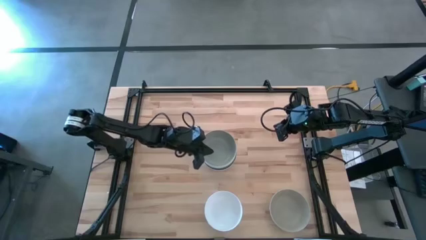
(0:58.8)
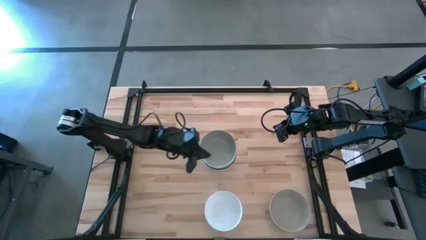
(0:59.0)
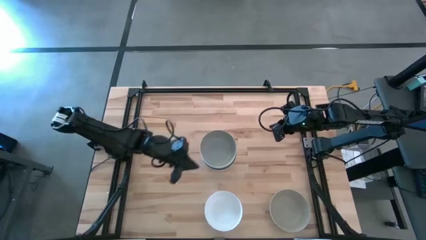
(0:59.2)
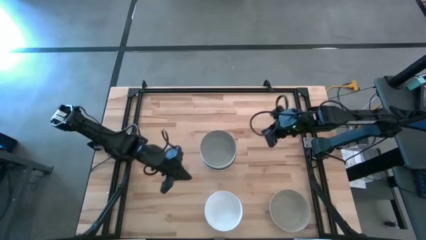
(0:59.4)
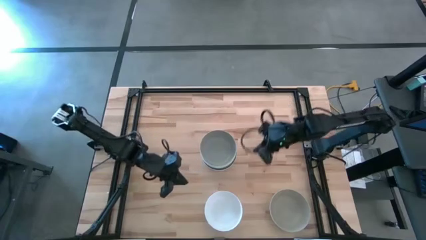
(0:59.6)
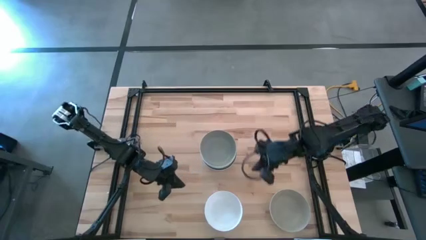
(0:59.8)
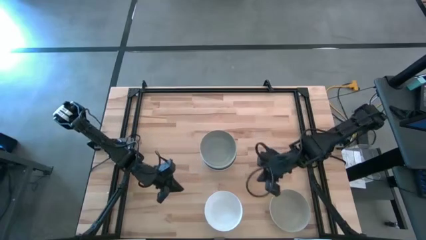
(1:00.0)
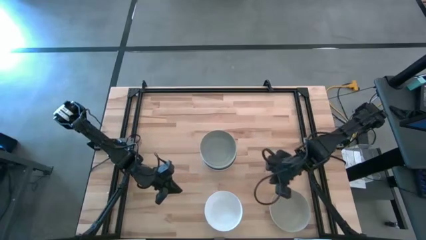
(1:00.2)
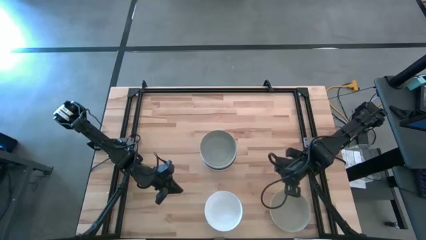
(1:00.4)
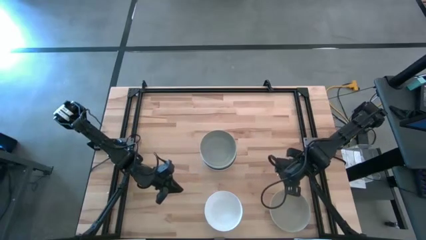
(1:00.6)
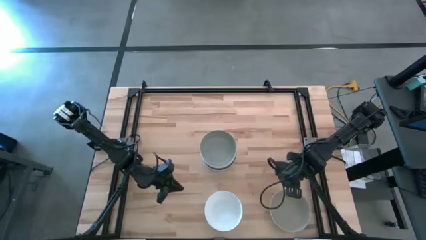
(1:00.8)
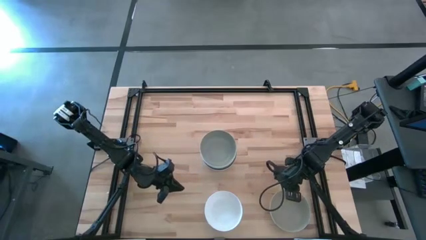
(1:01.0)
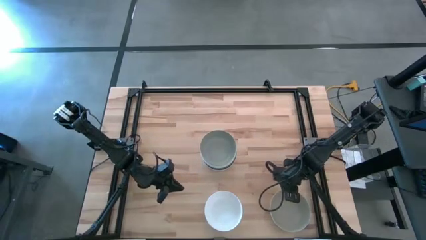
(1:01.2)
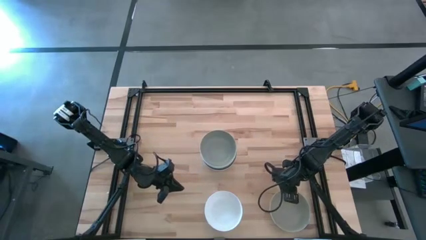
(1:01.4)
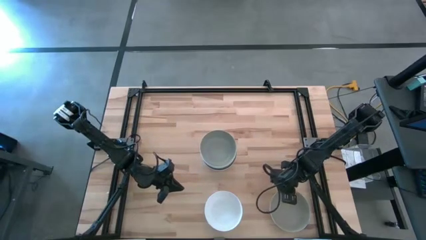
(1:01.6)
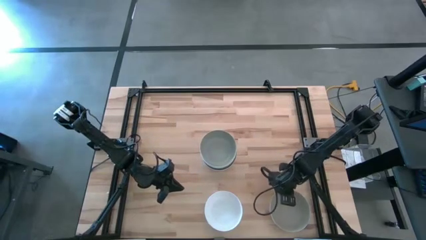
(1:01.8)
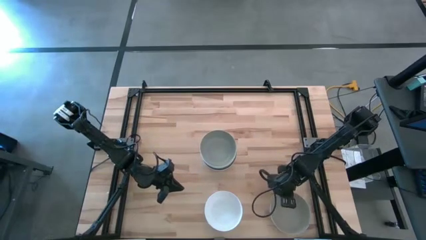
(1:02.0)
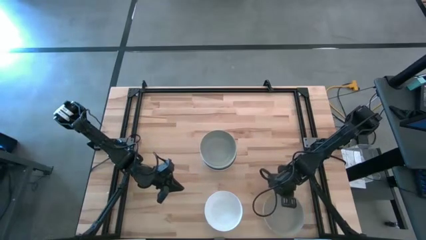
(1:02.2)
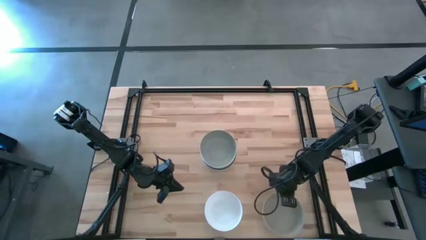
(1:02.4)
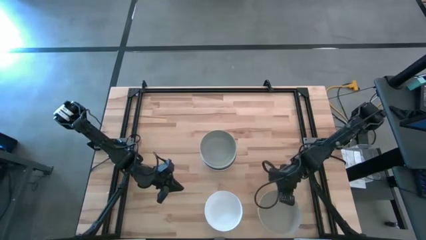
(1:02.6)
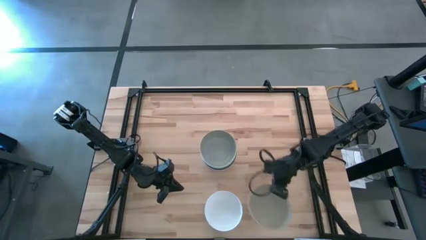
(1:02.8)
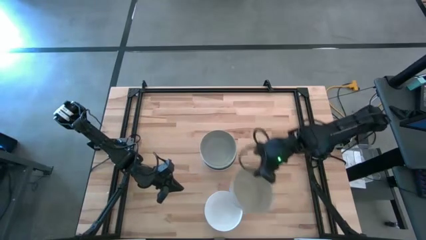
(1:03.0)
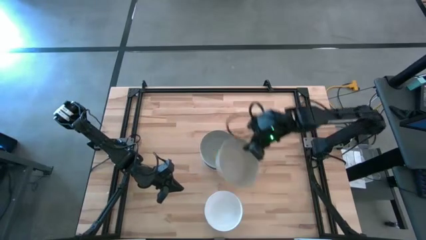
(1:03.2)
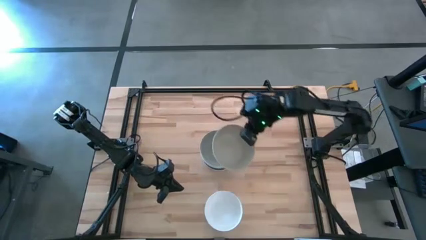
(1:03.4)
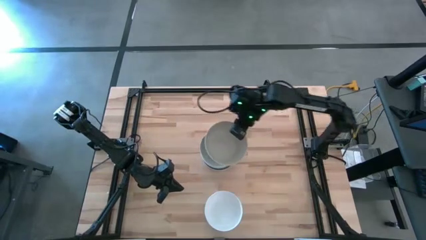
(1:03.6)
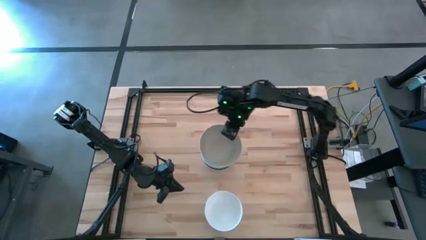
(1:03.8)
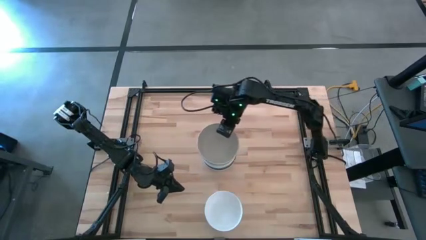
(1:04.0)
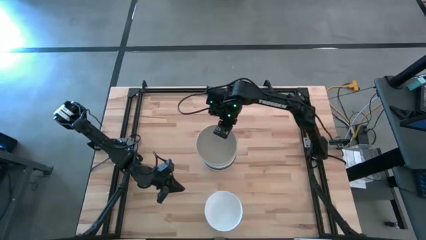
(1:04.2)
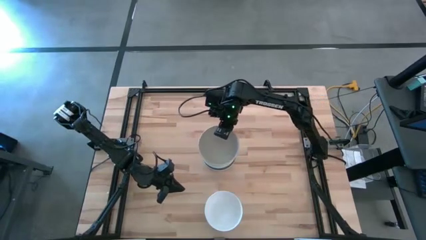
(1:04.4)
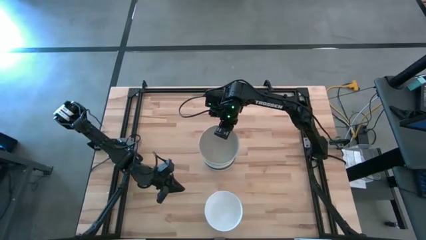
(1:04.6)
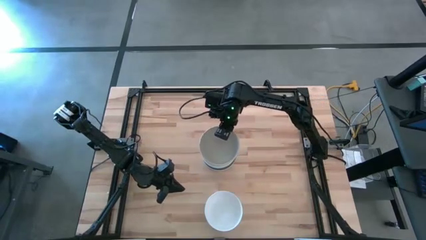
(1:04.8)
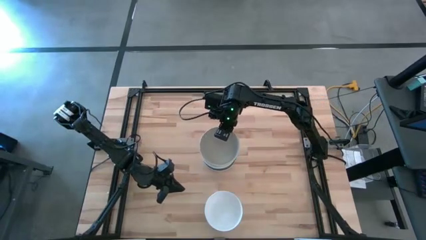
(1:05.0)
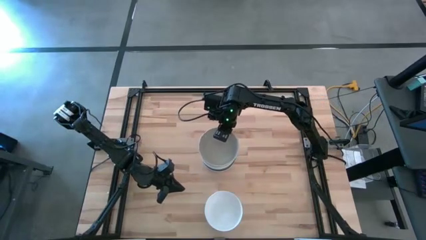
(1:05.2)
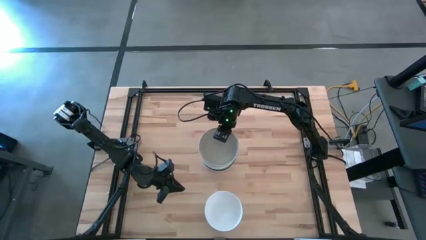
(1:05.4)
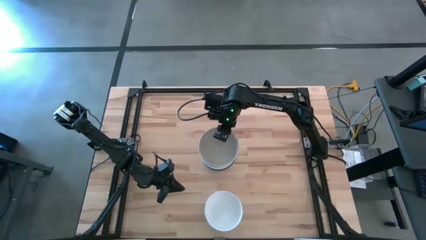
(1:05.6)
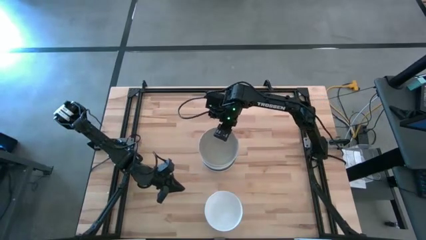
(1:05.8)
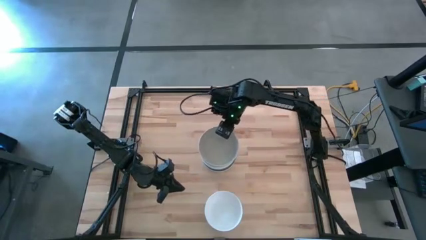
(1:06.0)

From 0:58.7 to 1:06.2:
Task: Nest bowls inside each other
Stack the brown bowl on the other brown bowl

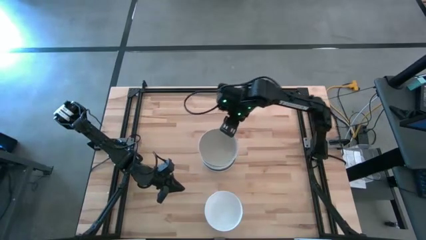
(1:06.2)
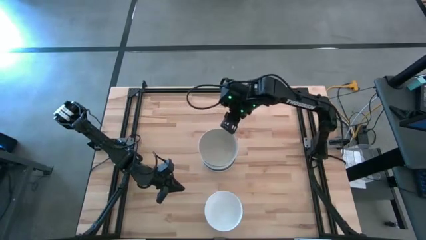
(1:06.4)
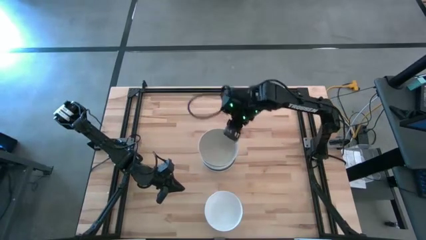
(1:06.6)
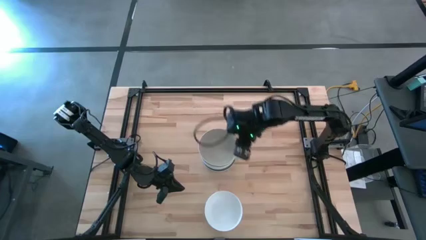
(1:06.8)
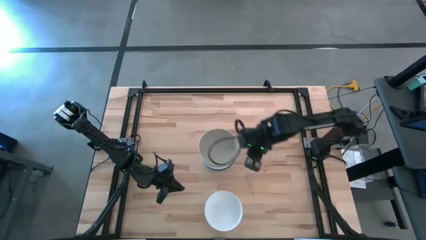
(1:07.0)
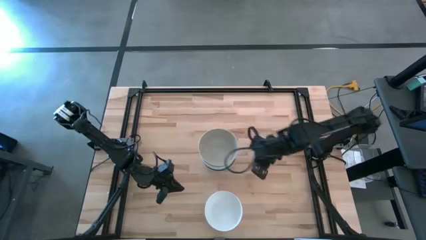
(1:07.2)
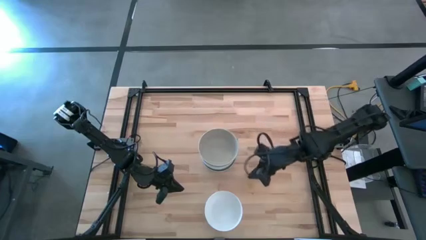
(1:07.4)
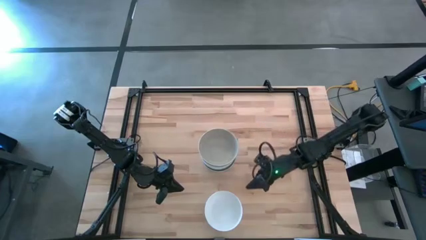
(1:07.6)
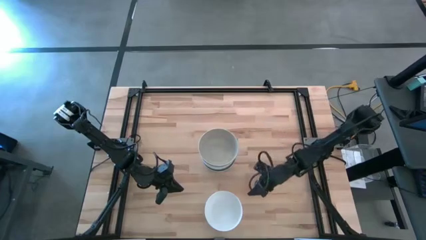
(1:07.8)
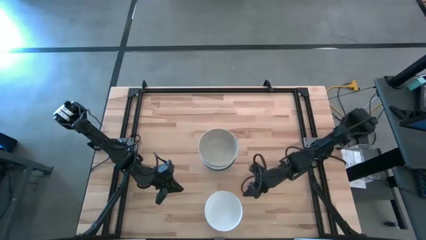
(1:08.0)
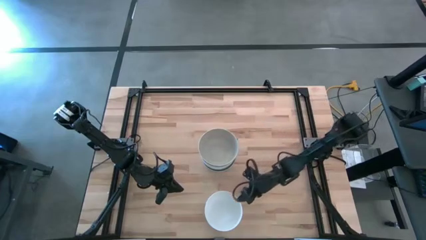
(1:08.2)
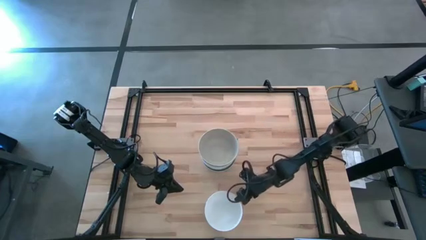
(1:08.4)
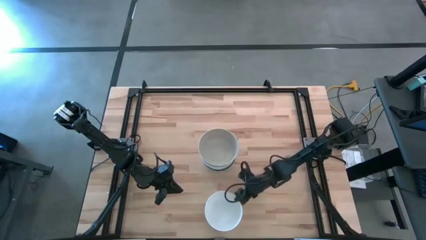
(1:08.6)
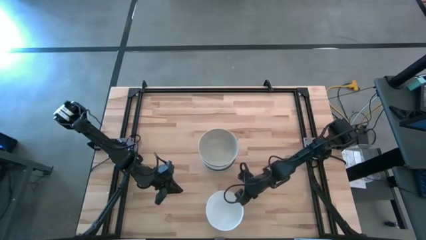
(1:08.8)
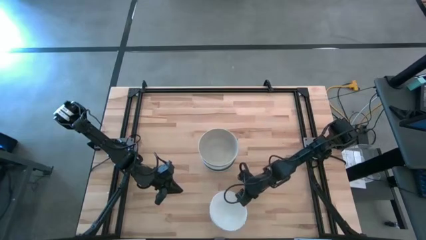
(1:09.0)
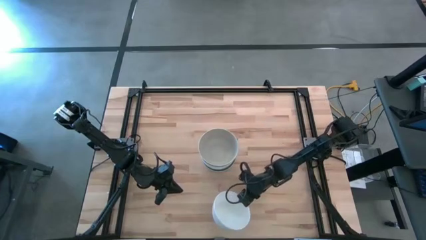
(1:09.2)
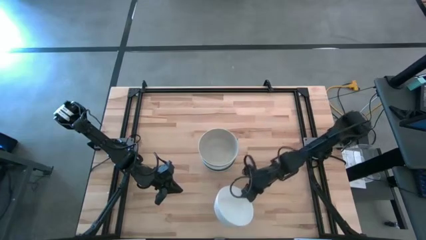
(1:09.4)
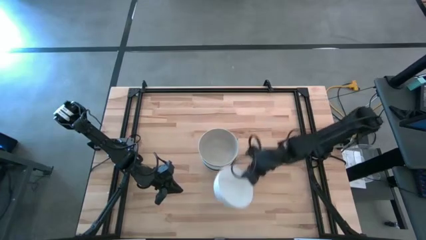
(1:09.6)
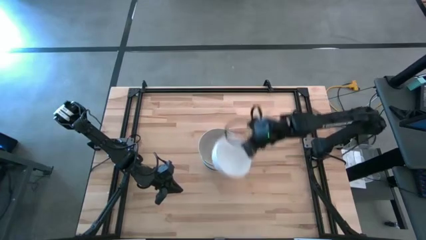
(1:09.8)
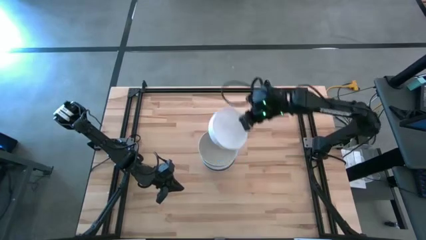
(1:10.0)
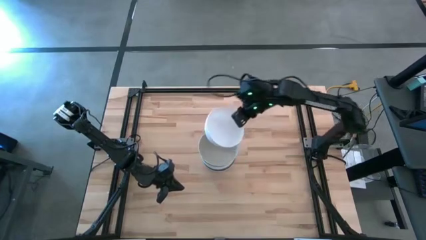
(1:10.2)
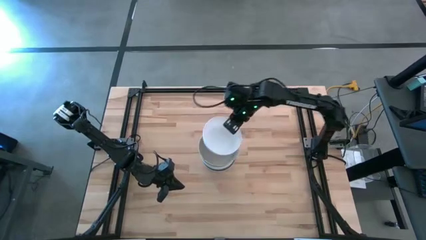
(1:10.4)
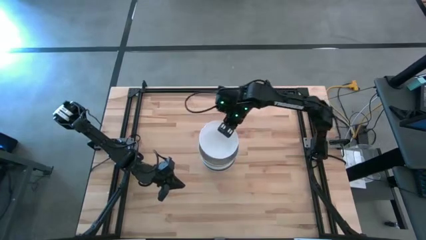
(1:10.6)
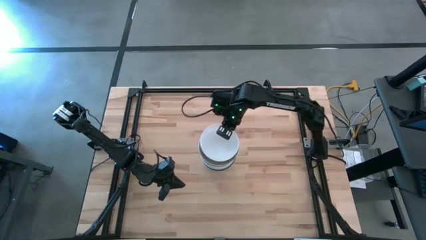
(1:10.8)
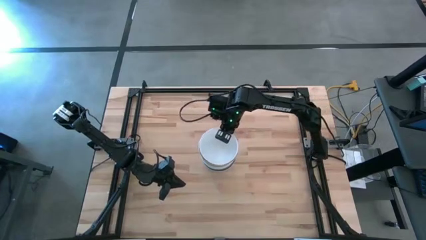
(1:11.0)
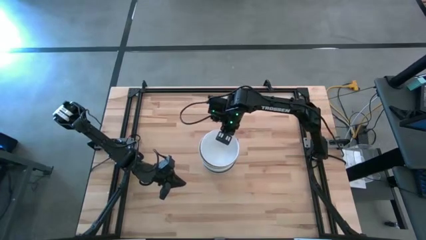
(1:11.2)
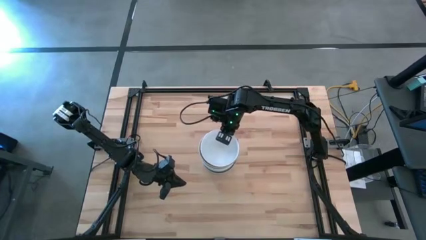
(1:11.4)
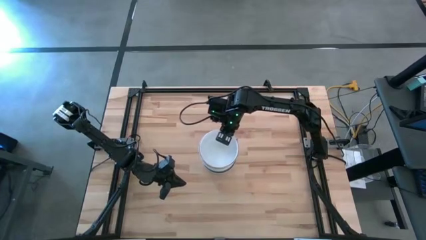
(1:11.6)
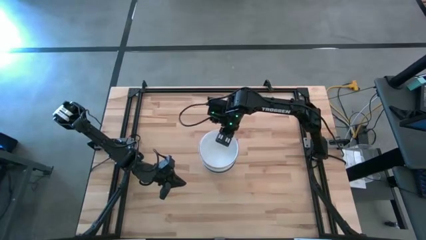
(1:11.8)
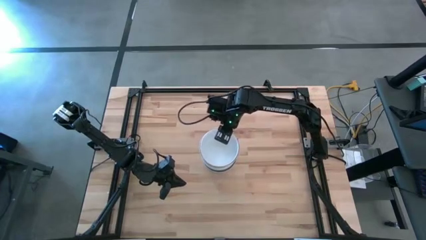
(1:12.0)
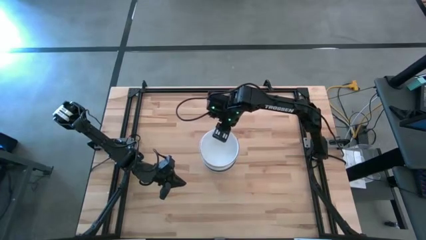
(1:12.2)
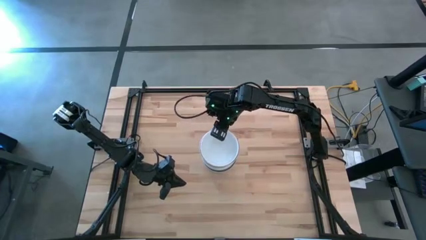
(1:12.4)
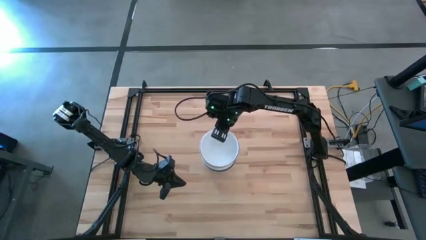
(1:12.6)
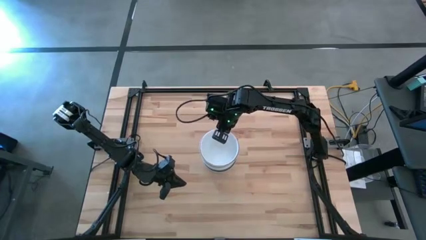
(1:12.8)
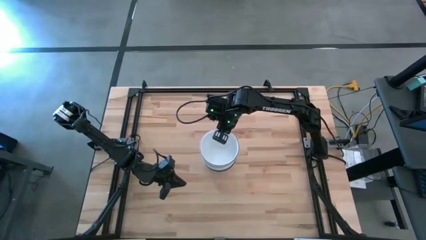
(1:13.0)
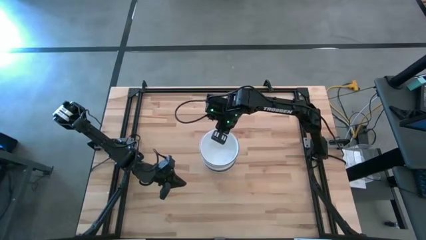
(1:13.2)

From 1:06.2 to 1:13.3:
Stack the white bowl on the brown bowl
